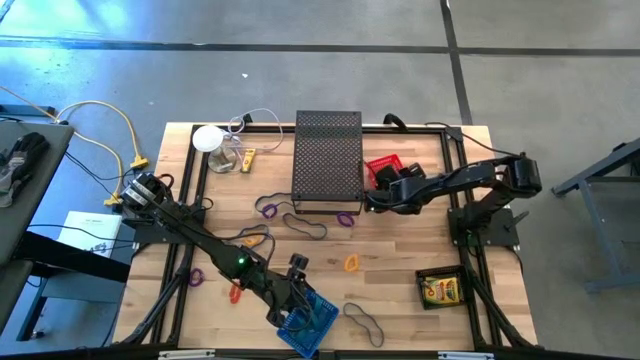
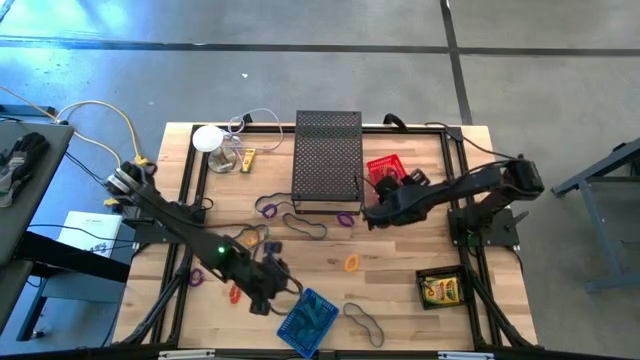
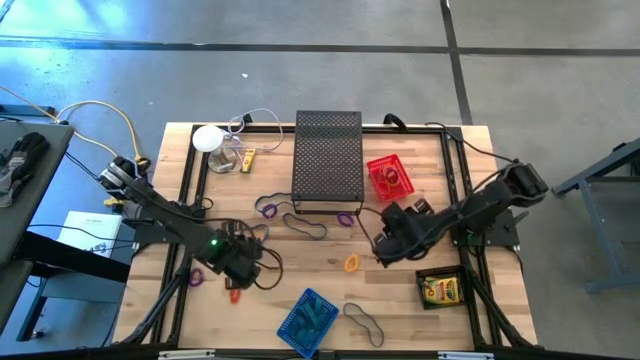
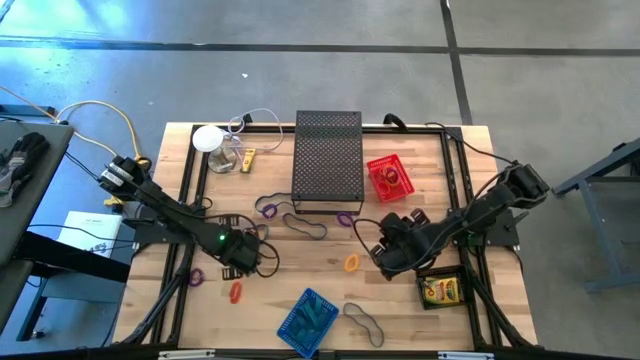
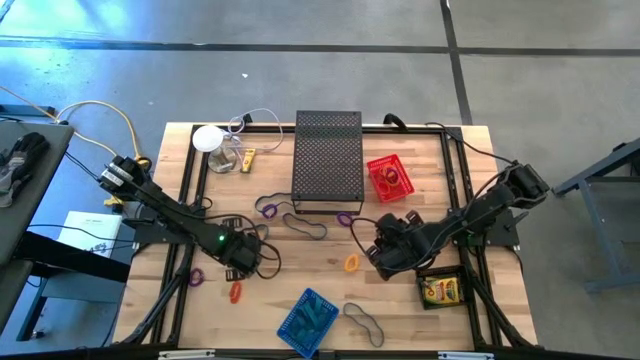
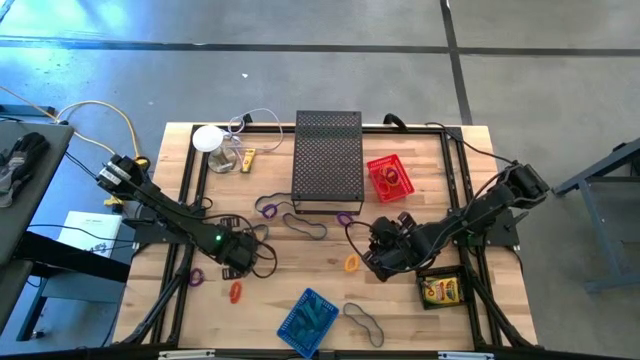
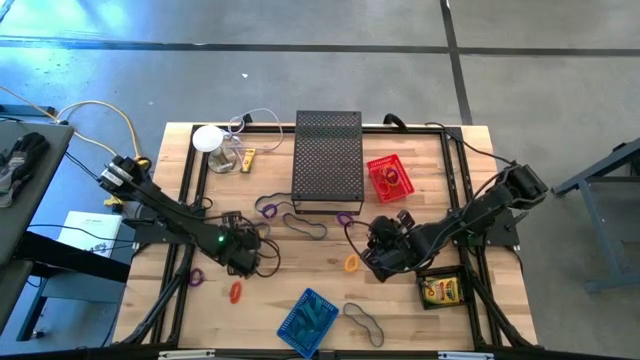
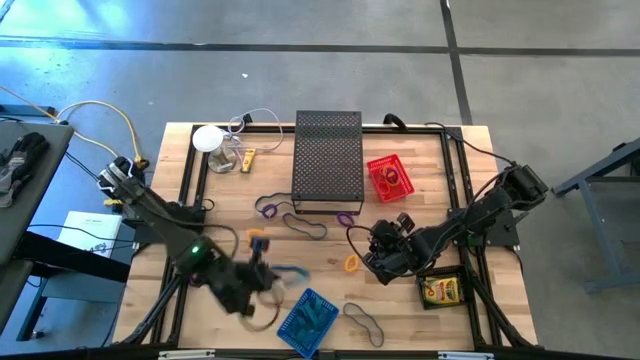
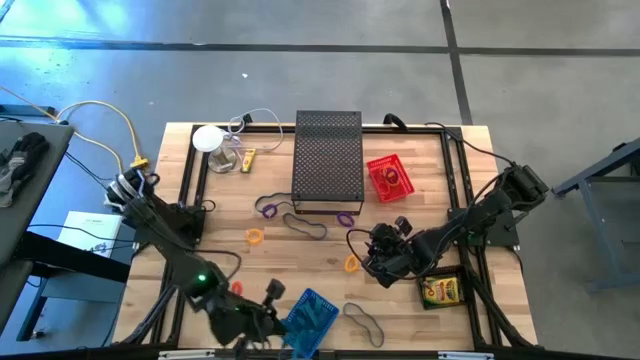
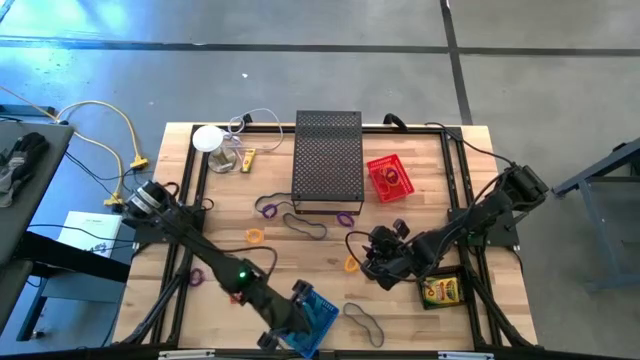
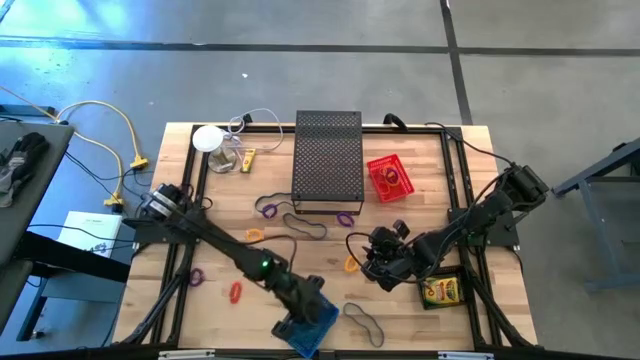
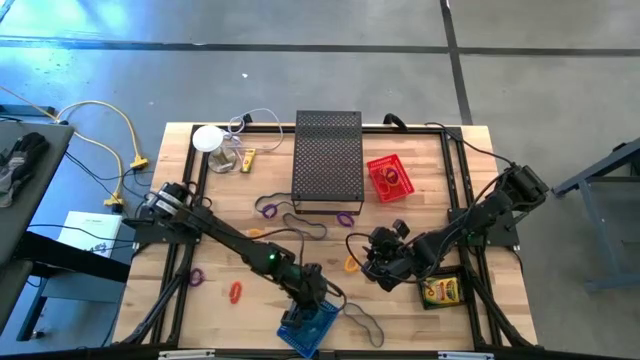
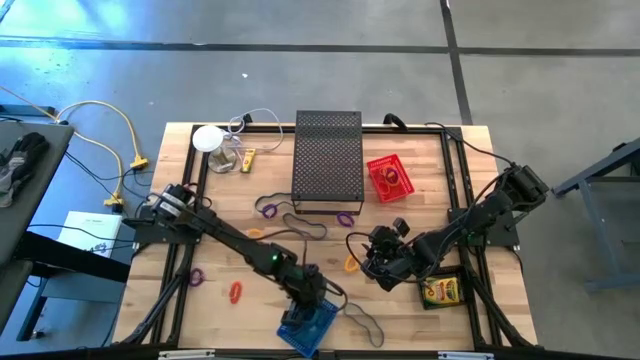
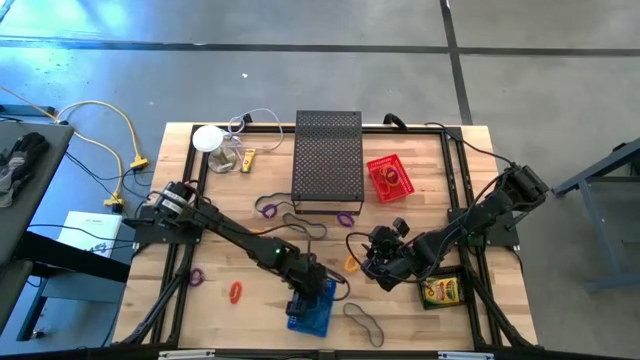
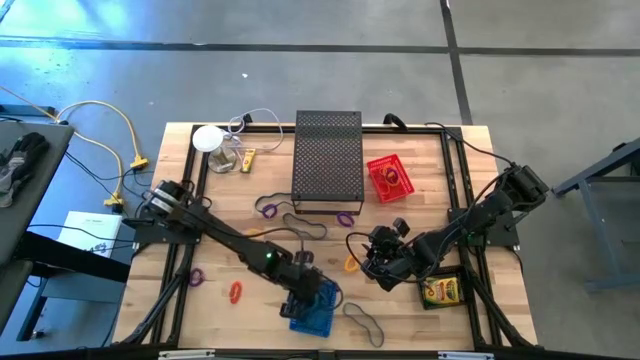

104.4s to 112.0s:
Task: Pick & Place Office Desk Supplies
Put the blue rubber band into the blue bin

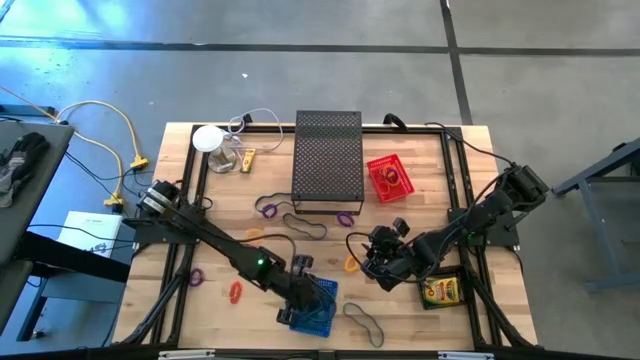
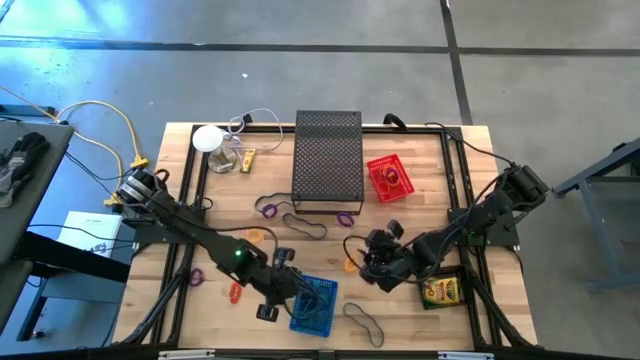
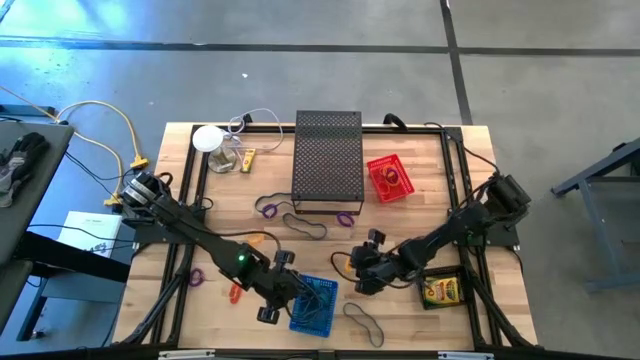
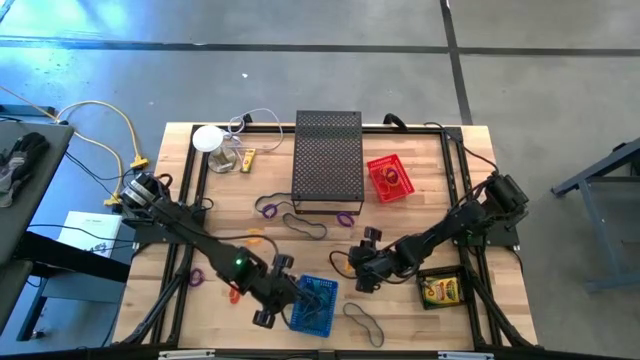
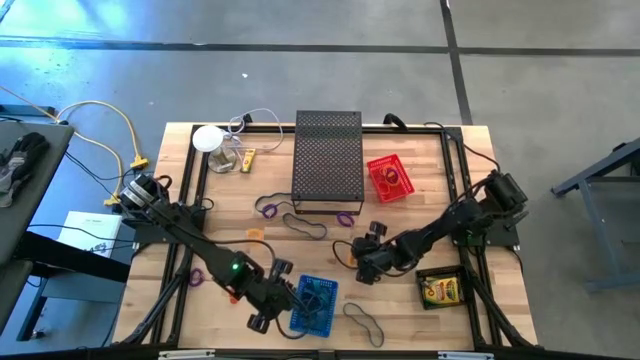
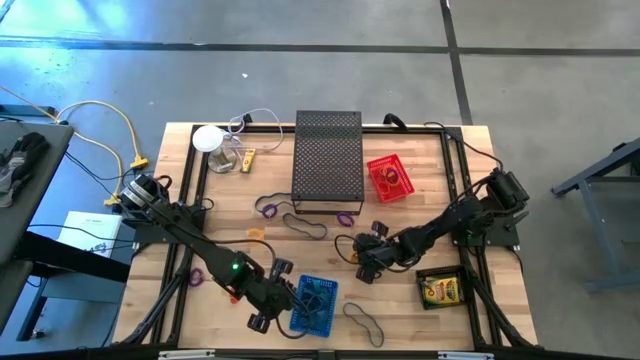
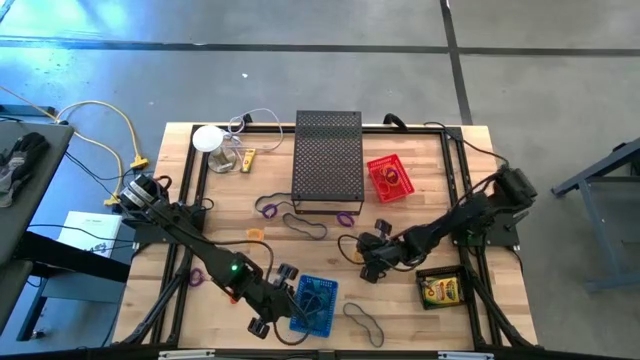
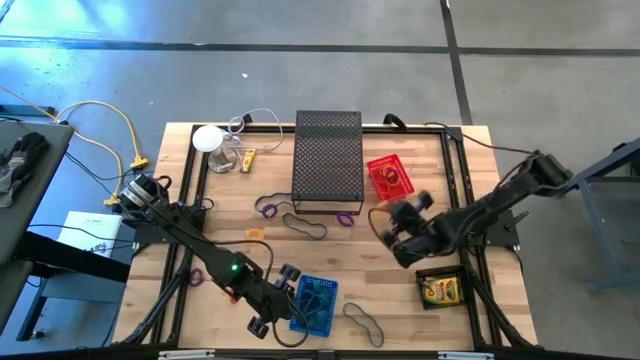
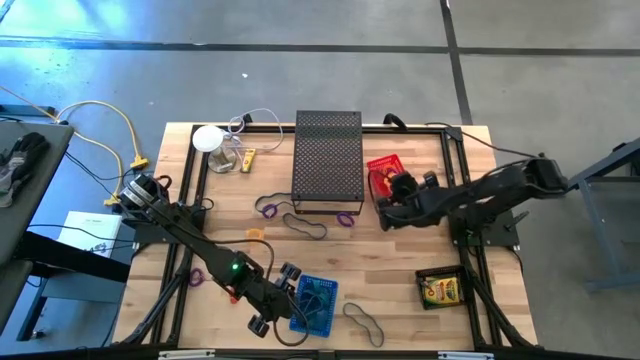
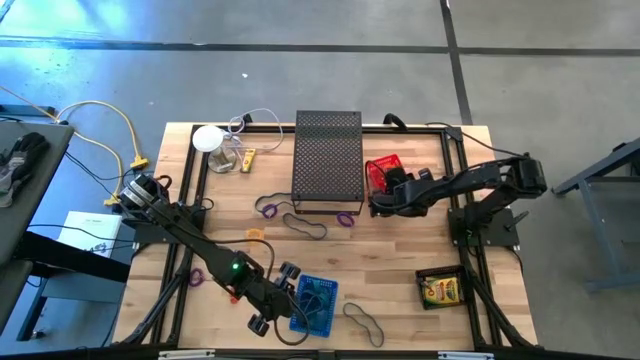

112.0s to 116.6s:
Put the yellow spring keychain into the red bin

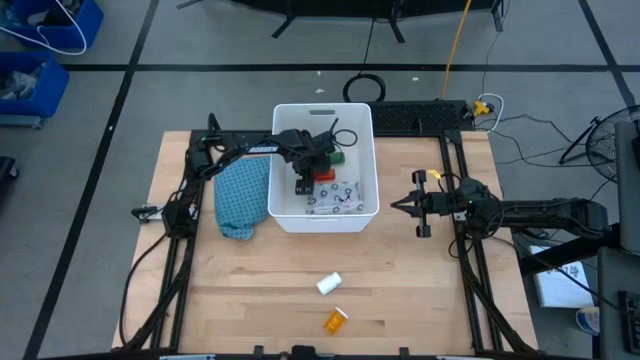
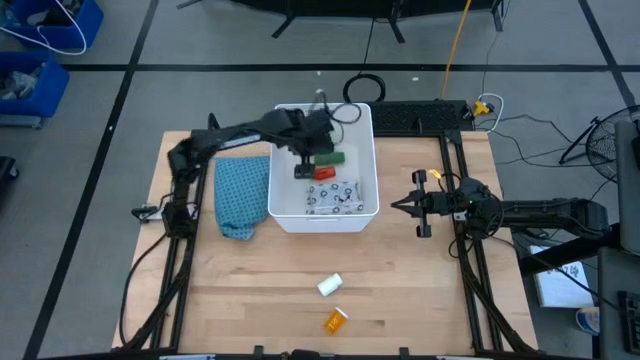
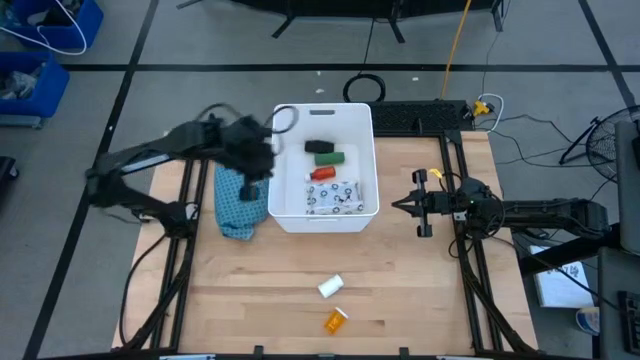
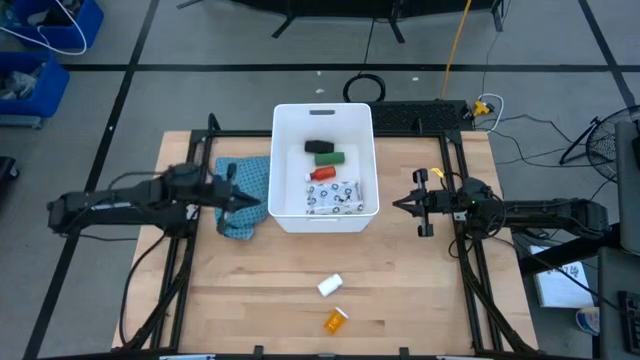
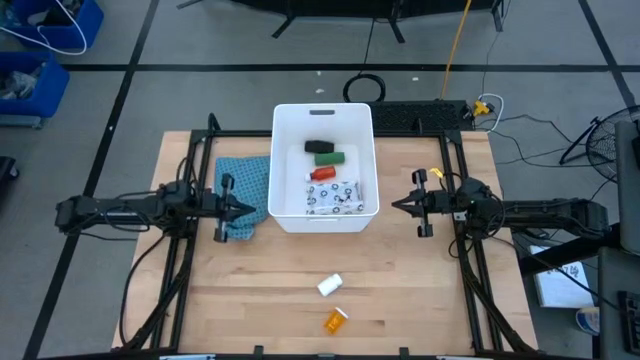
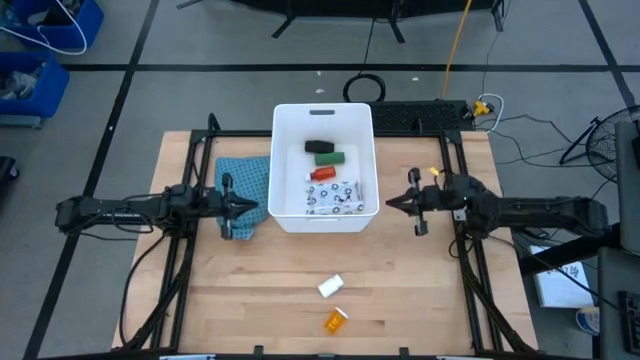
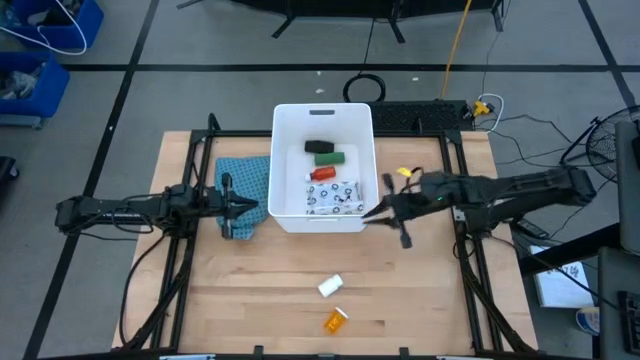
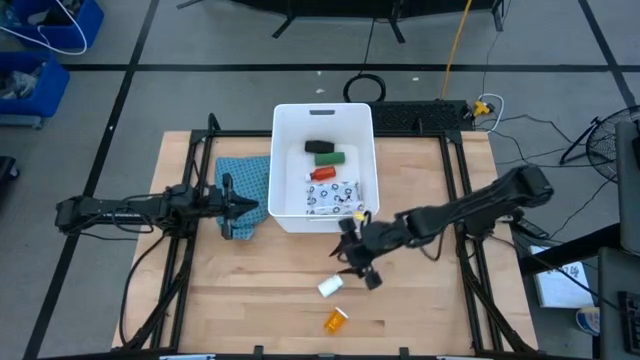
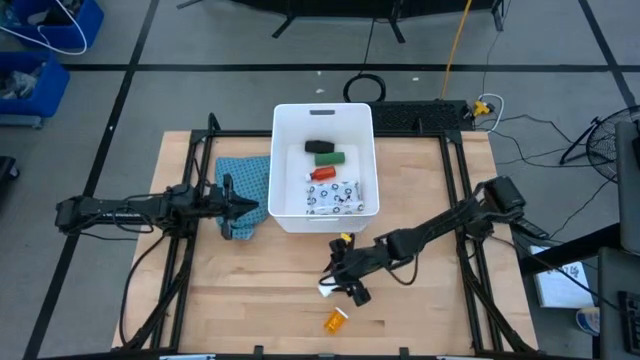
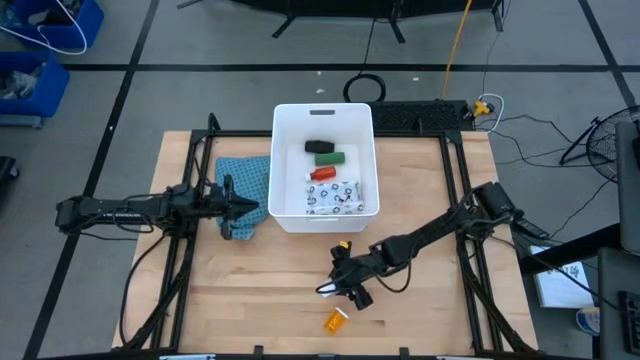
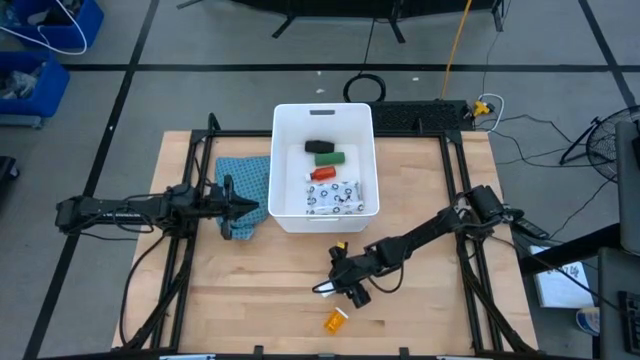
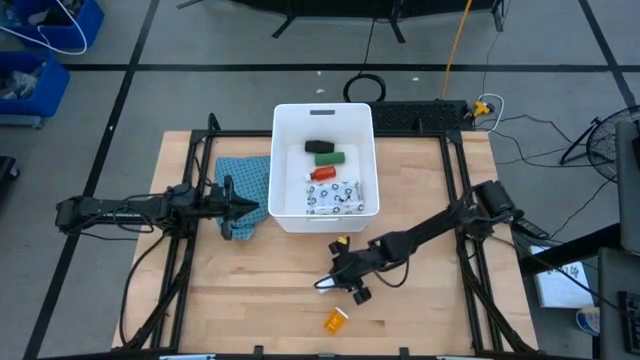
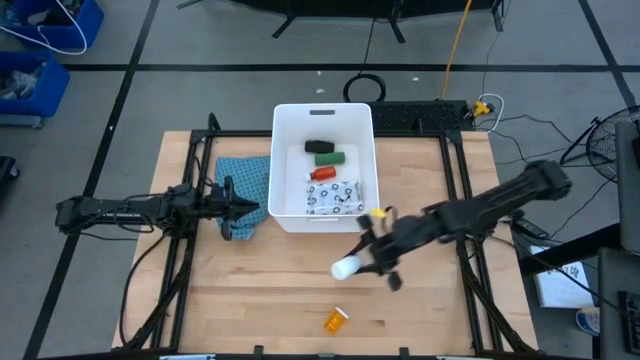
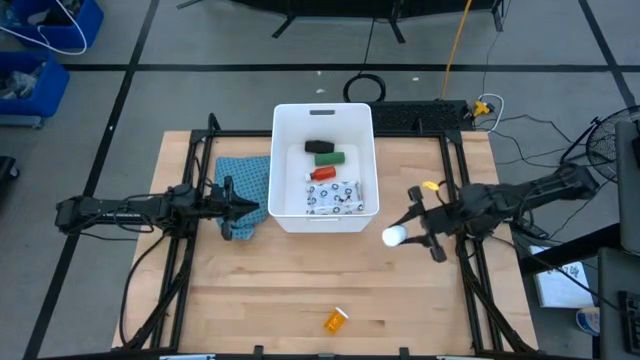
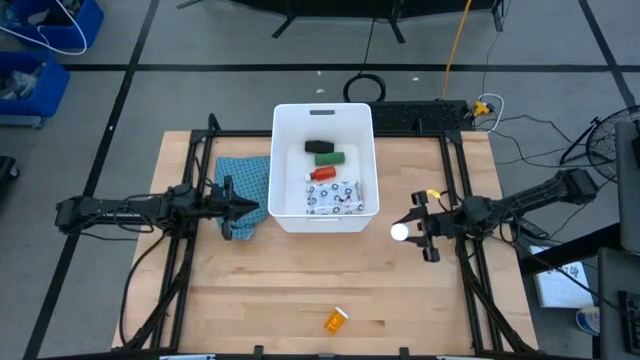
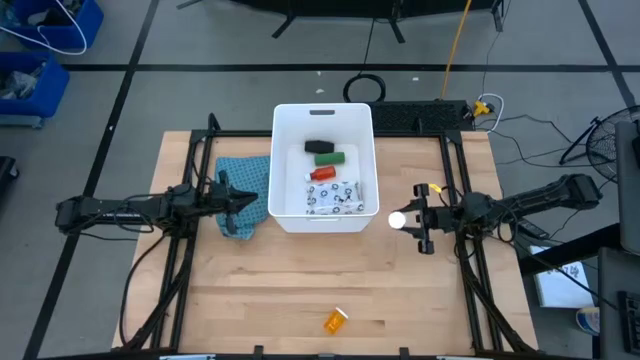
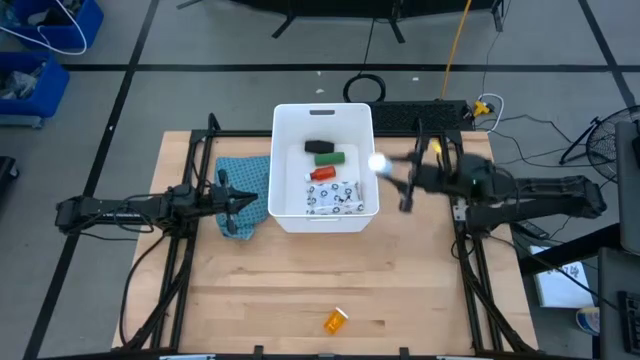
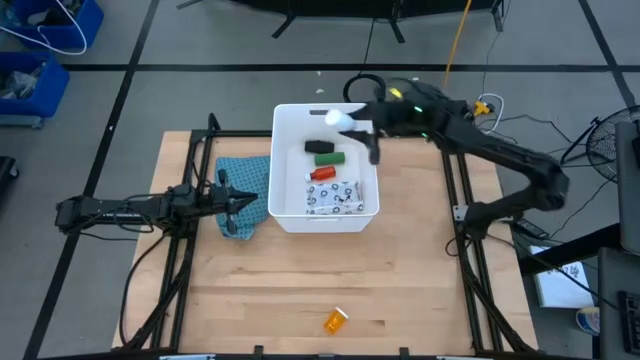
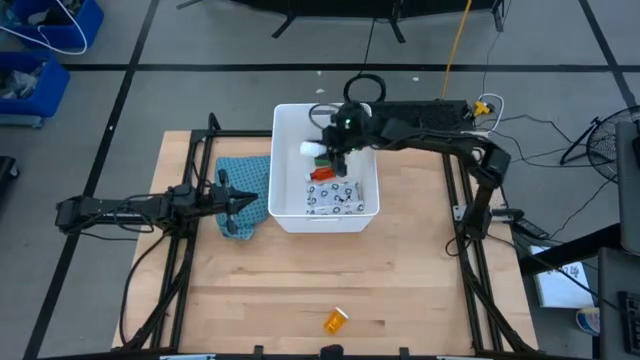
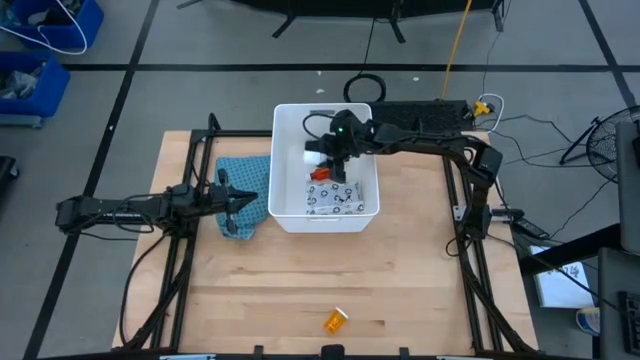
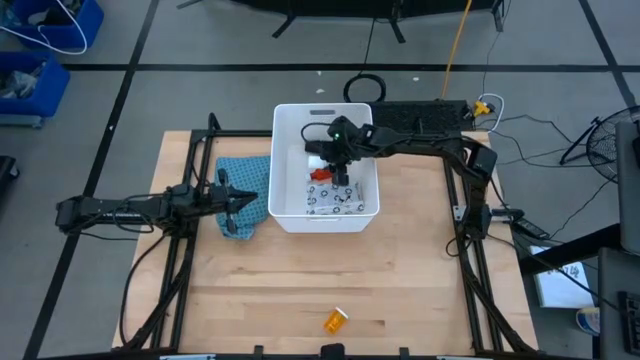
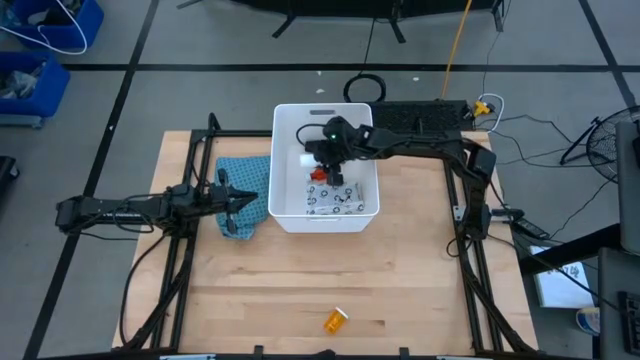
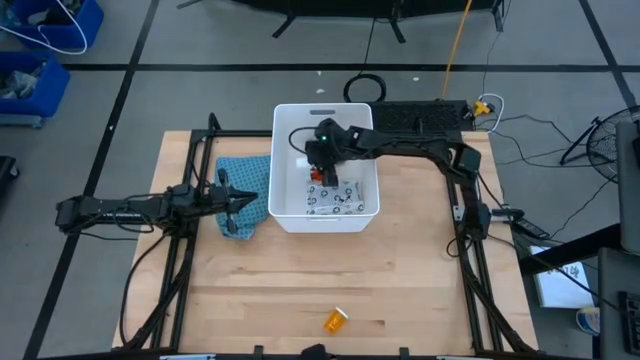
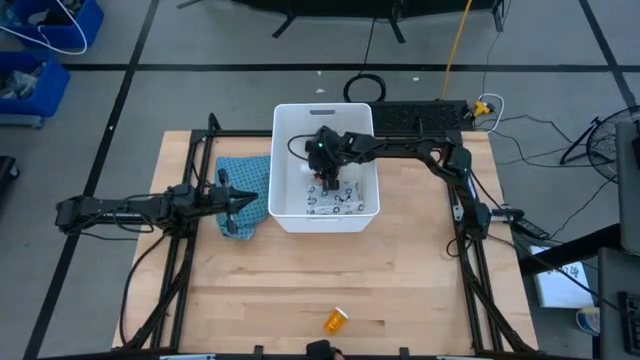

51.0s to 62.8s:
Task: Pick & place medical supplies in basket/bin
Put the white pill bottle into the white container
